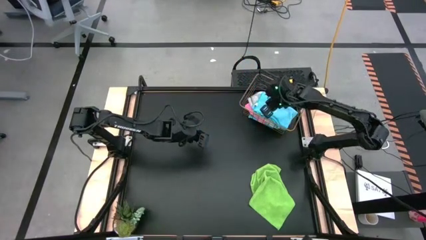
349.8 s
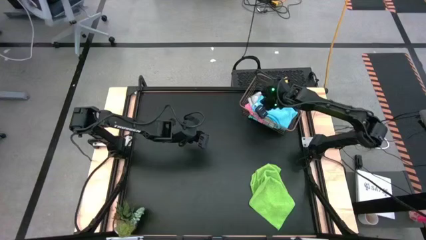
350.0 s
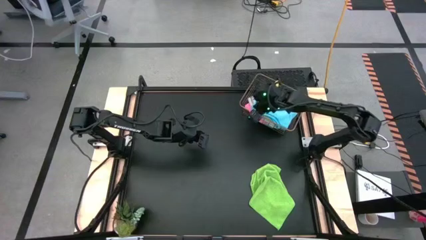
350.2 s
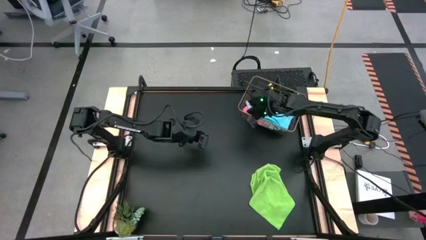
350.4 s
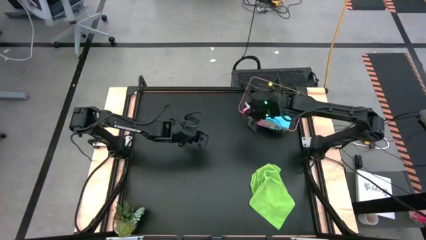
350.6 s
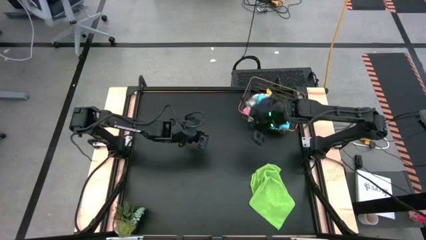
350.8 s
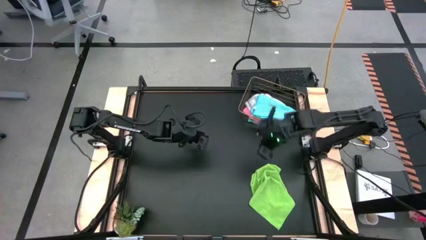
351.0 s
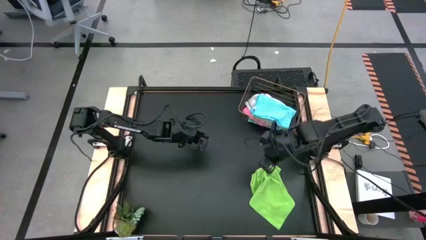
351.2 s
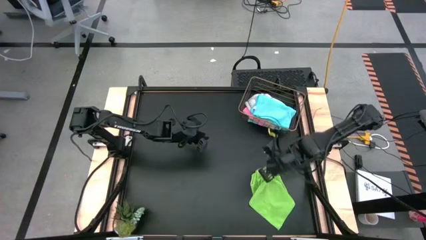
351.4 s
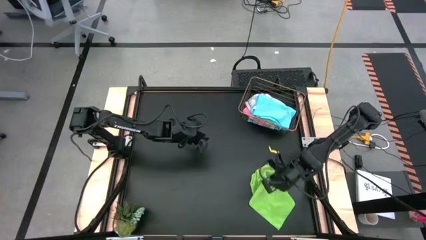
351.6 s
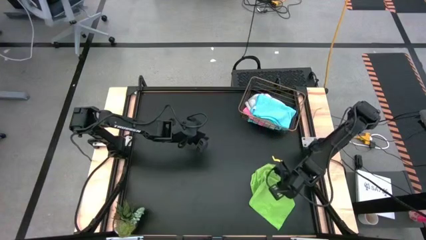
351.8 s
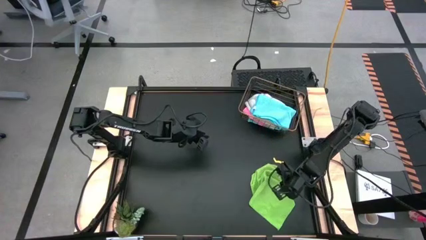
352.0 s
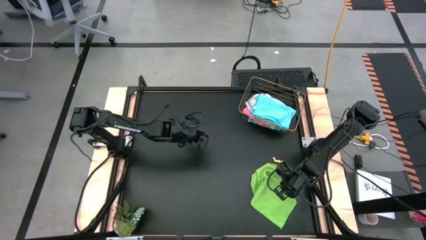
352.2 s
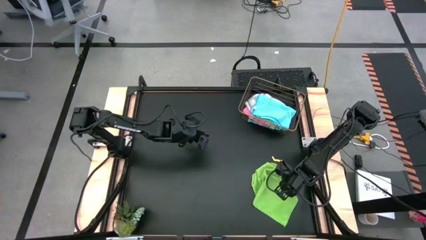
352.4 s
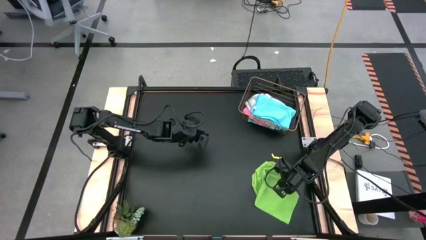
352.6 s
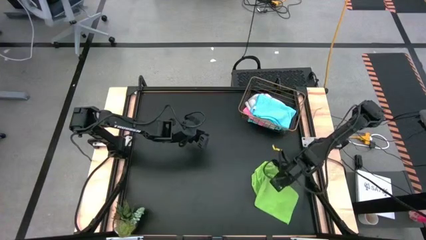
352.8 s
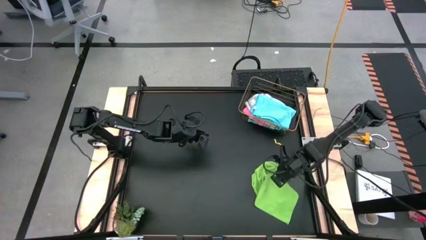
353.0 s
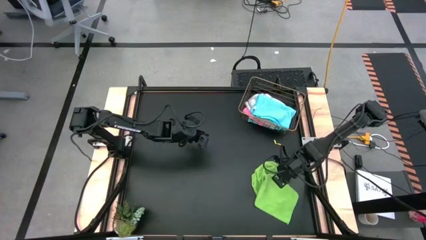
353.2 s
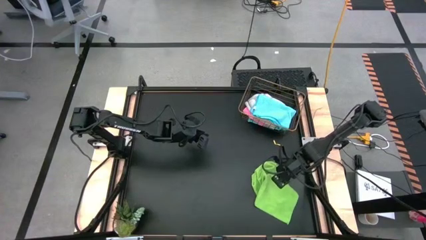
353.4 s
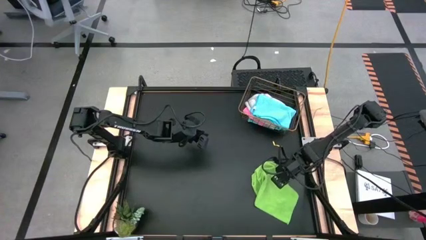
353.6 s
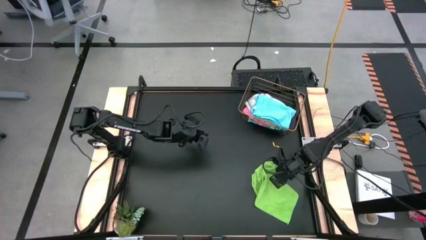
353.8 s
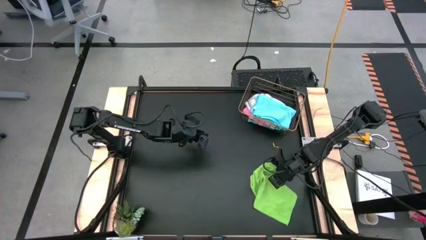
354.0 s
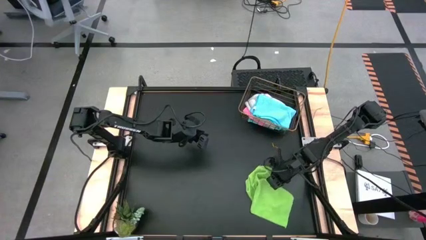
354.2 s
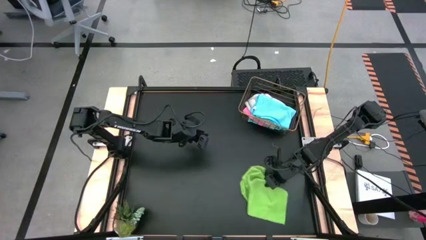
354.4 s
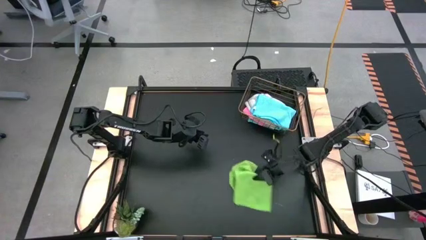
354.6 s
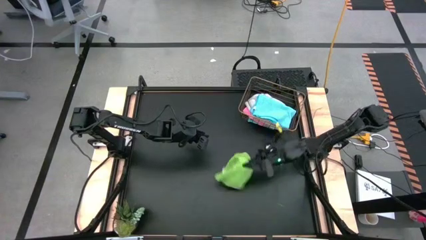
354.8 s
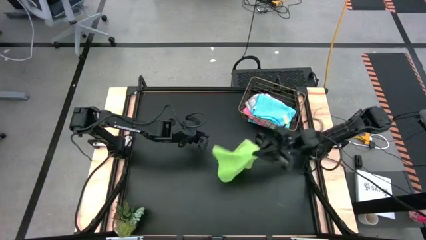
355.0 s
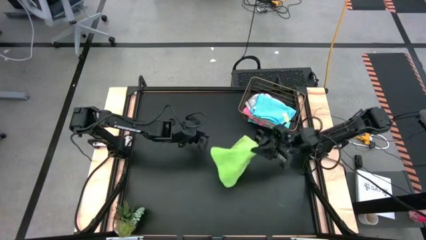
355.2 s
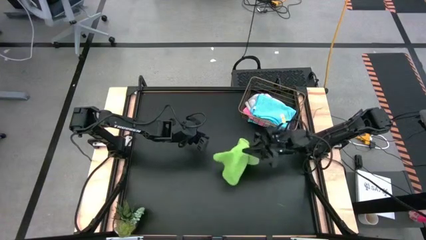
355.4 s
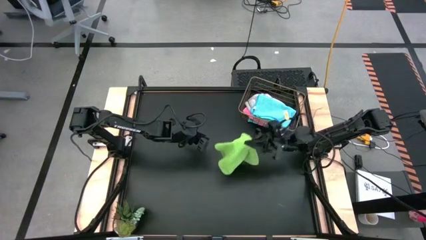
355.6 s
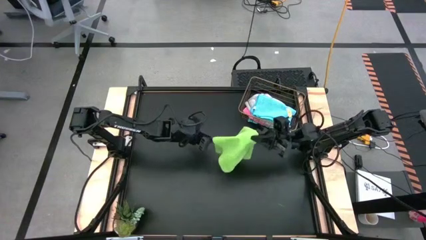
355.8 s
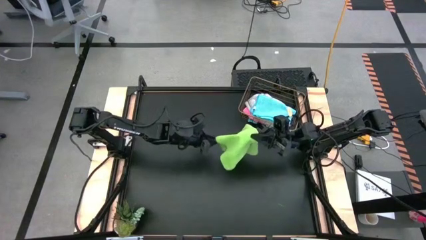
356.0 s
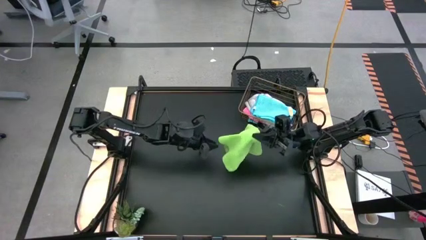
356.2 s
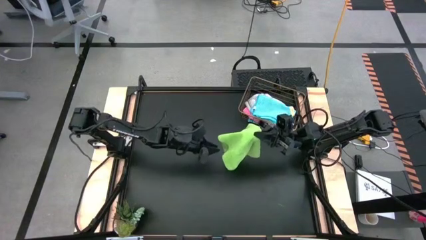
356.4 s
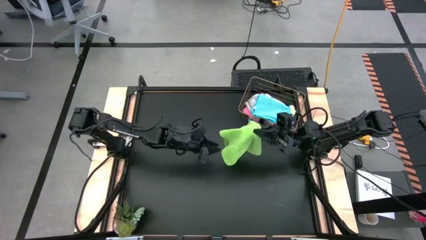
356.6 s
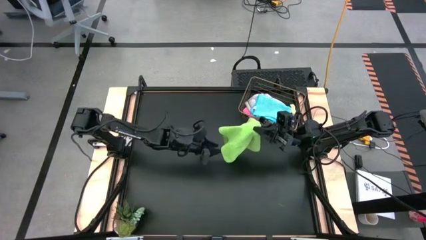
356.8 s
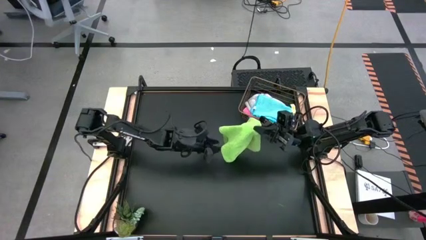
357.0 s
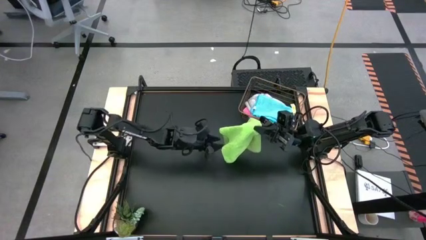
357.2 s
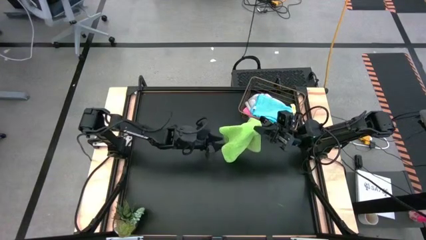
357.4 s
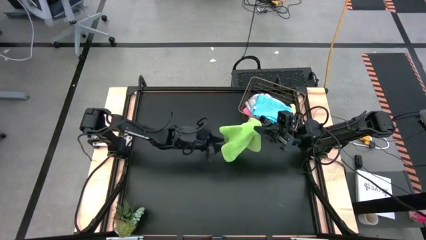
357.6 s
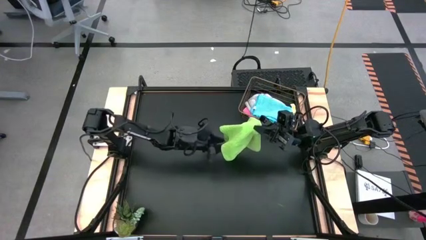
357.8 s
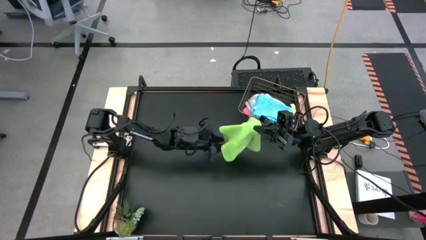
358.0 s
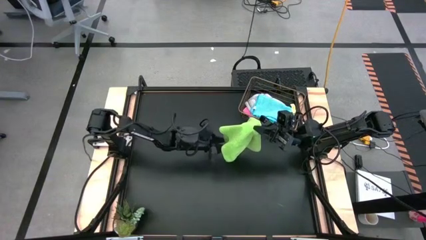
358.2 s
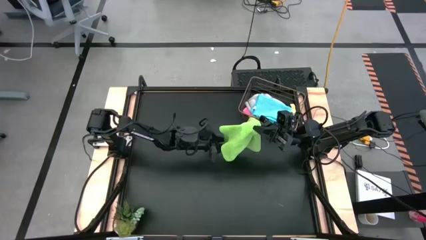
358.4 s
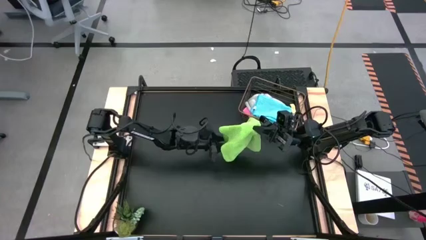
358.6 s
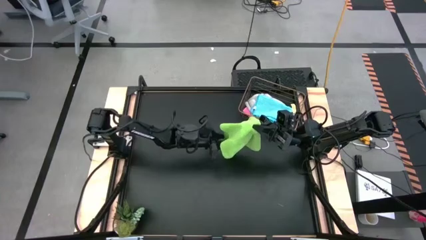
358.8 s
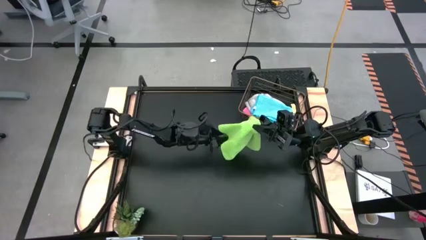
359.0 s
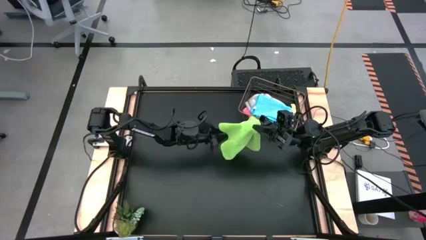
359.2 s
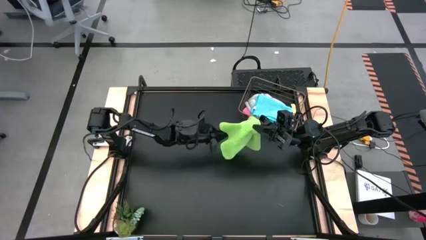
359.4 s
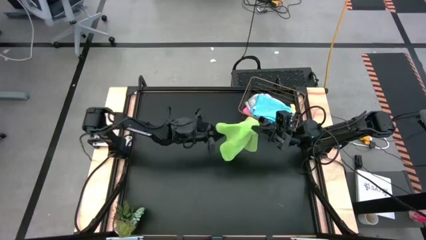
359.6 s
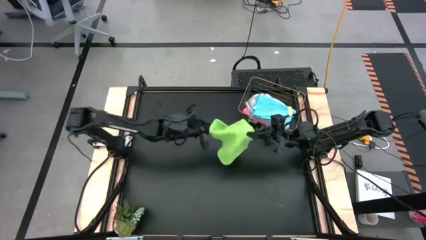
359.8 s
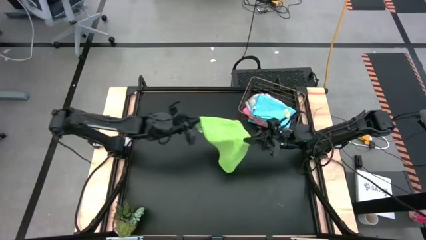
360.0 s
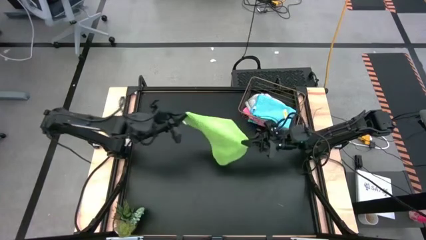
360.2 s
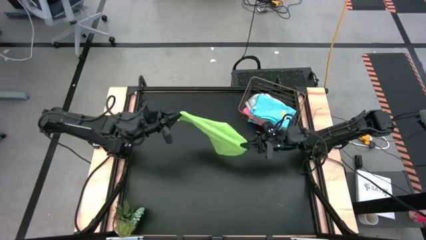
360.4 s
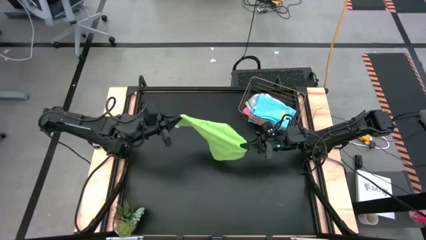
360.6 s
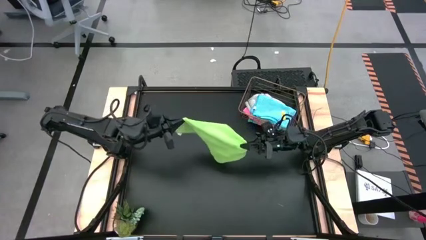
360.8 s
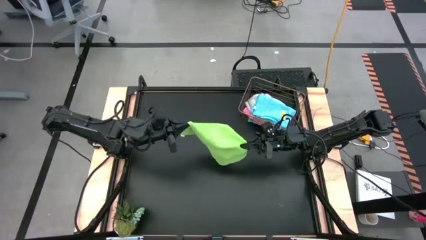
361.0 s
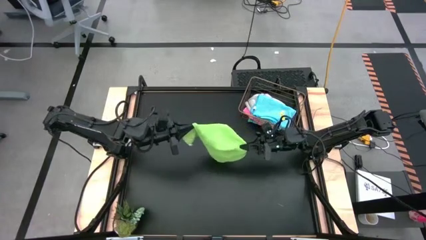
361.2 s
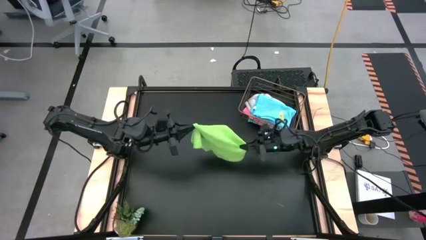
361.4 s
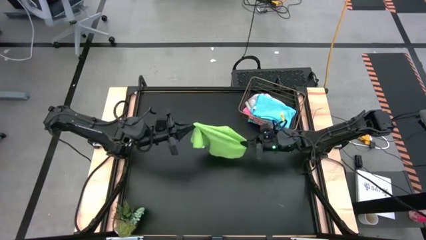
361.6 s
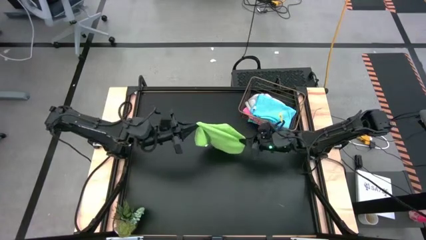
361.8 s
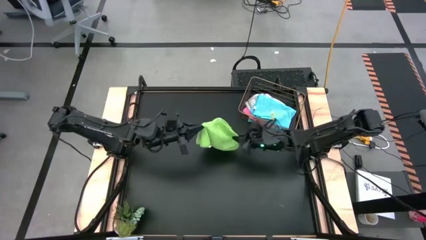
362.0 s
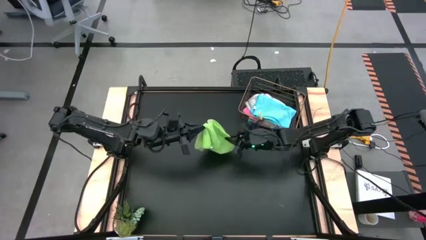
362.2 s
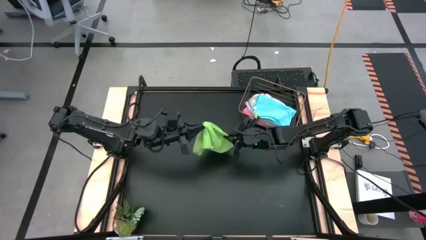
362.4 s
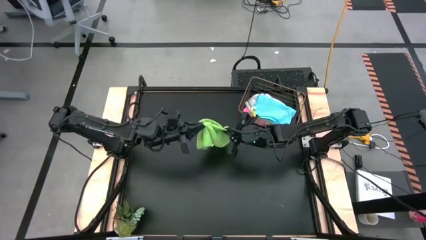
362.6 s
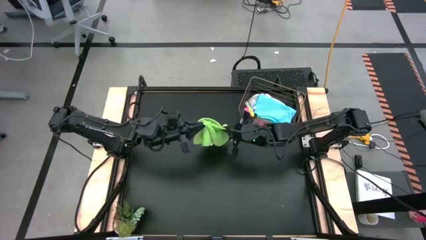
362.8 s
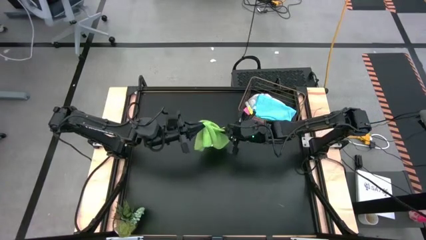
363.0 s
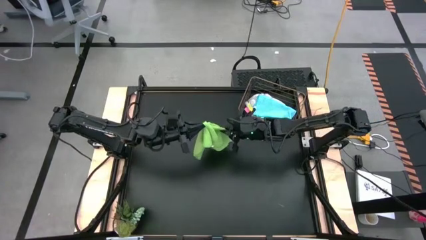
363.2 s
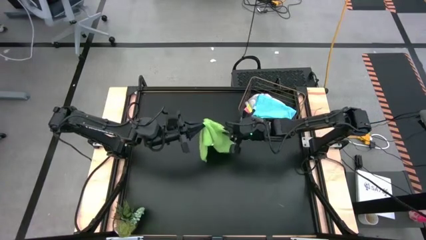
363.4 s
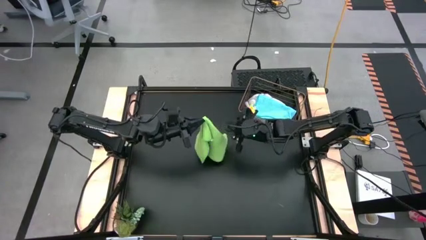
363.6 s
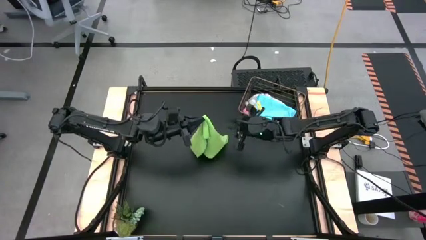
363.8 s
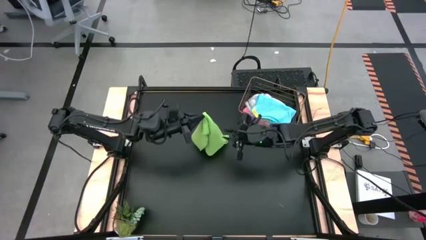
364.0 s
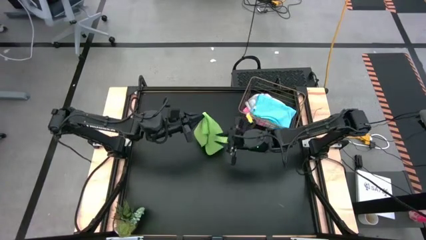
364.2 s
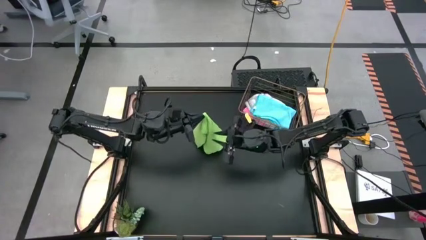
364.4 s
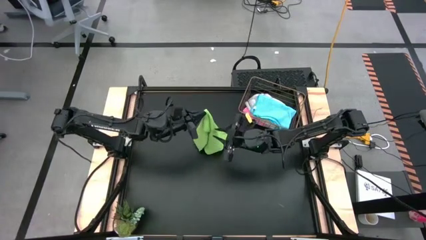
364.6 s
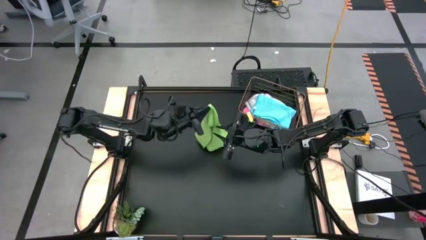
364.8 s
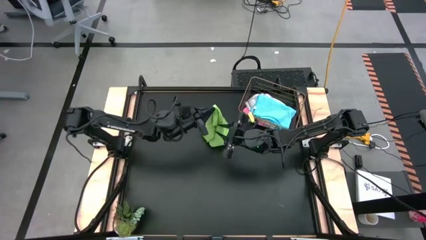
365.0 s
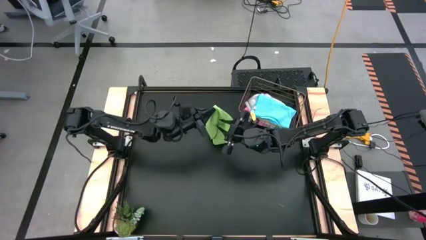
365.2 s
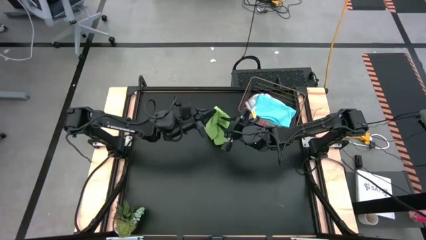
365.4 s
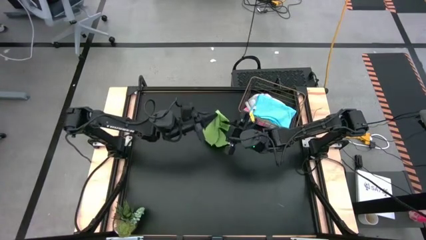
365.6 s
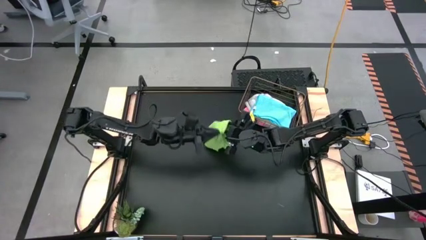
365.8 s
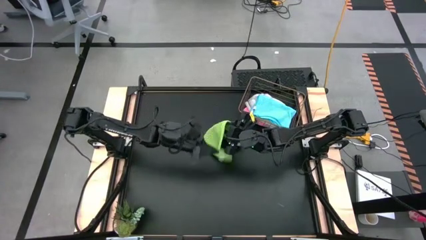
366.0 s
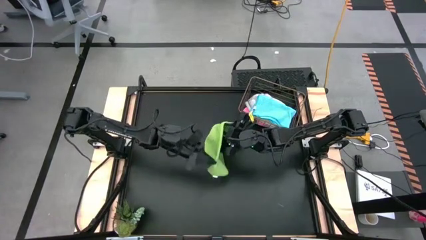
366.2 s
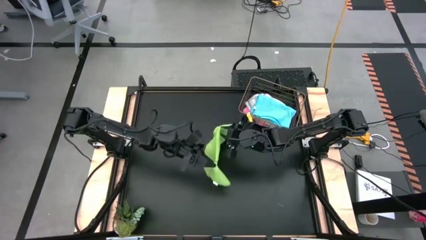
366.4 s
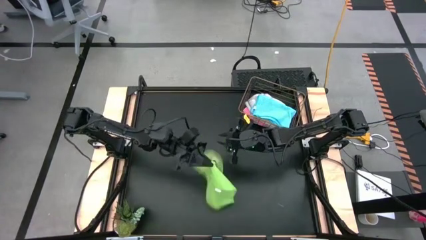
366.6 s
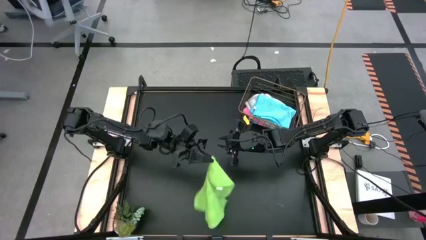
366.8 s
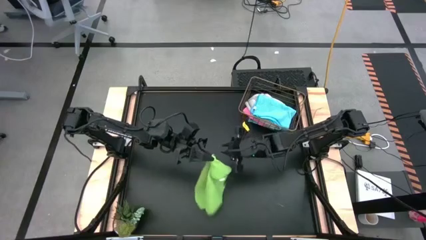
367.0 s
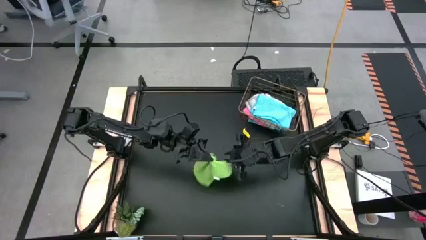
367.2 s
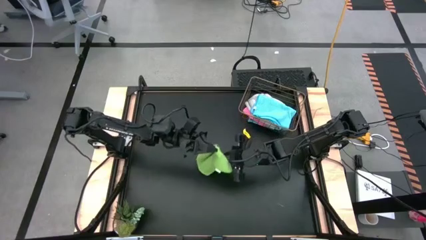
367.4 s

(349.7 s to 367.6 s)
Task: Fold microfiber towels
Fold the green towel
